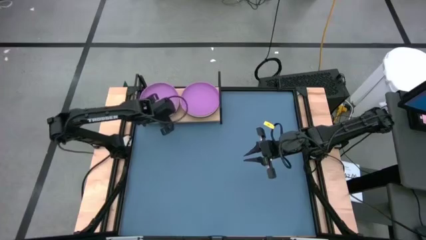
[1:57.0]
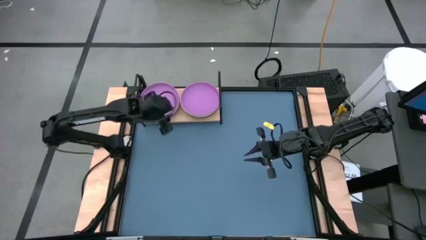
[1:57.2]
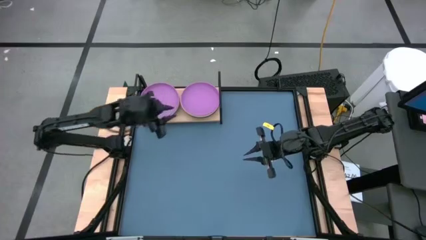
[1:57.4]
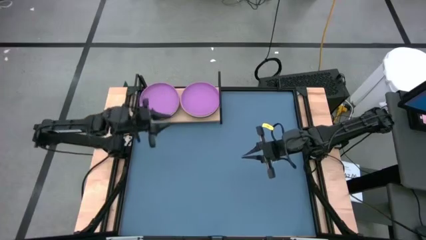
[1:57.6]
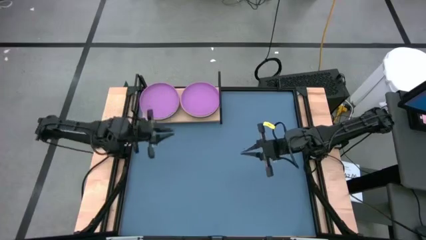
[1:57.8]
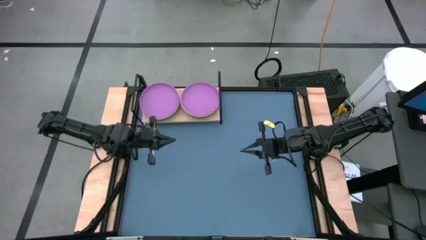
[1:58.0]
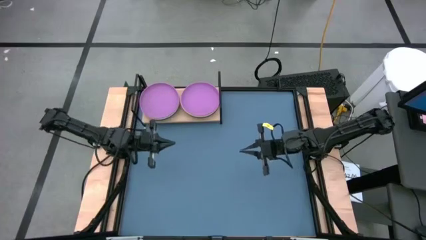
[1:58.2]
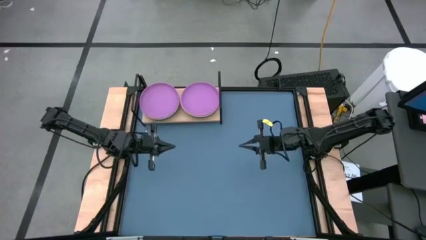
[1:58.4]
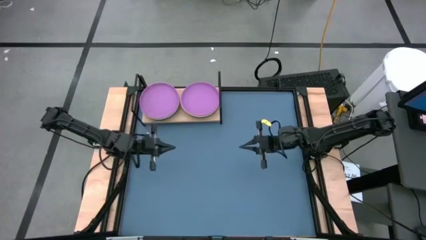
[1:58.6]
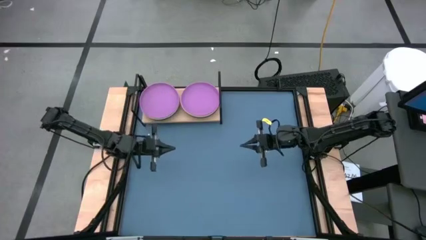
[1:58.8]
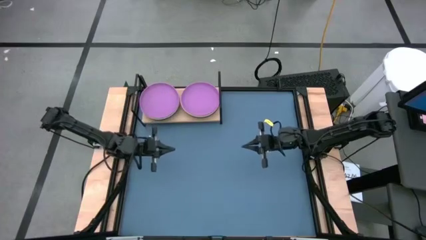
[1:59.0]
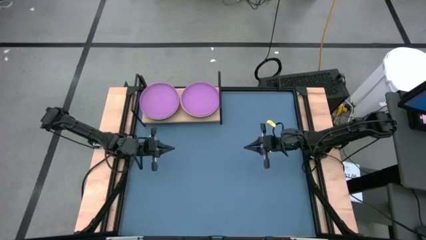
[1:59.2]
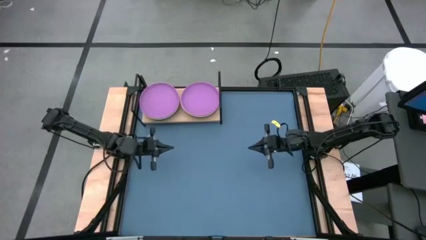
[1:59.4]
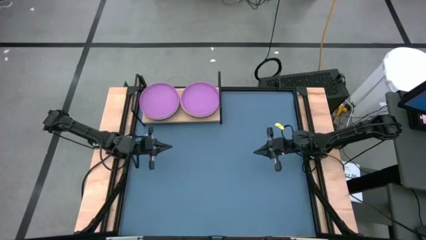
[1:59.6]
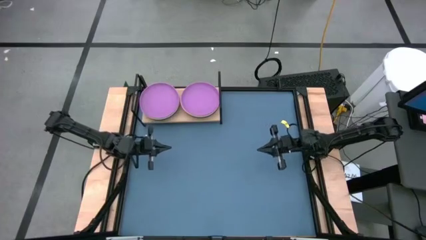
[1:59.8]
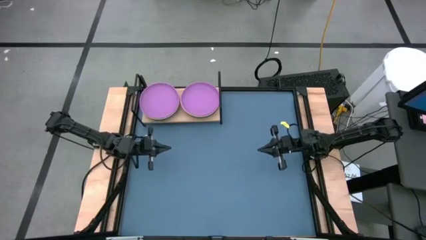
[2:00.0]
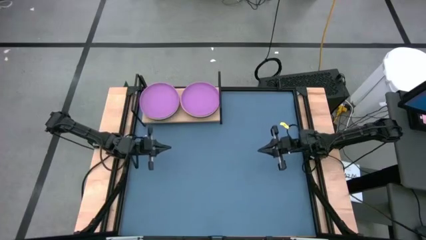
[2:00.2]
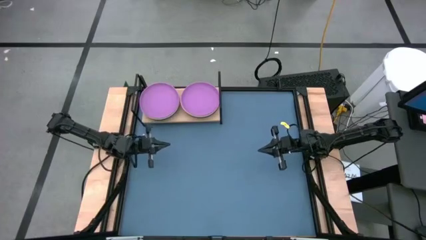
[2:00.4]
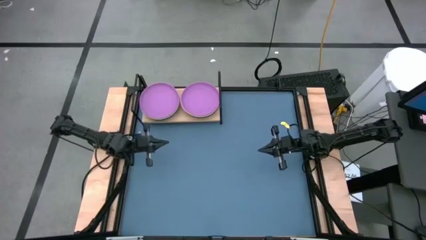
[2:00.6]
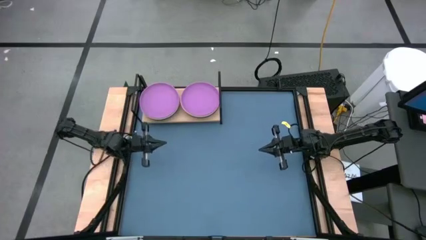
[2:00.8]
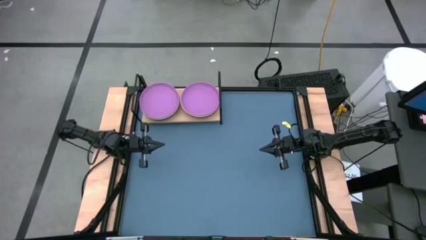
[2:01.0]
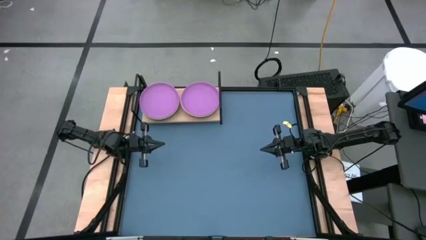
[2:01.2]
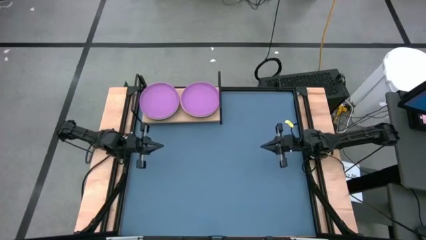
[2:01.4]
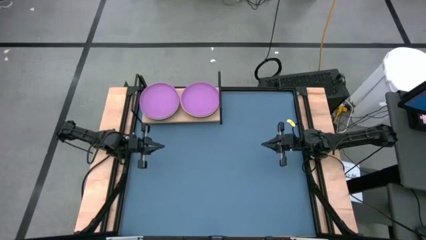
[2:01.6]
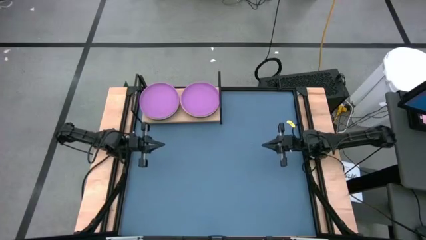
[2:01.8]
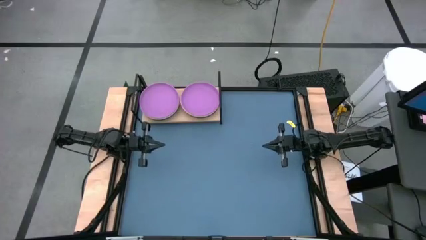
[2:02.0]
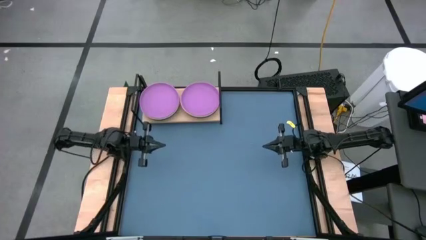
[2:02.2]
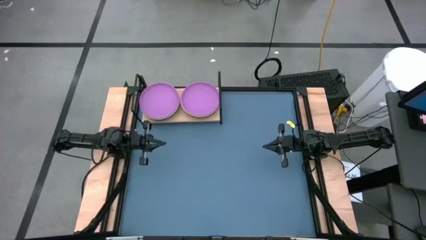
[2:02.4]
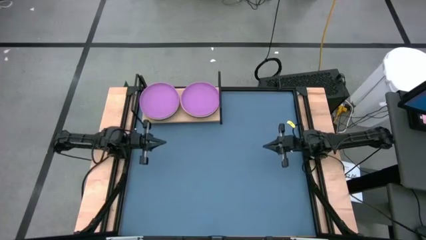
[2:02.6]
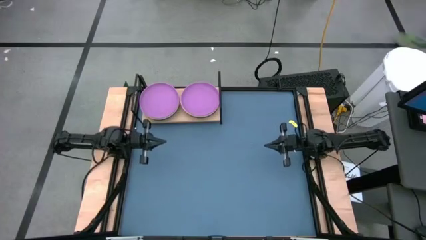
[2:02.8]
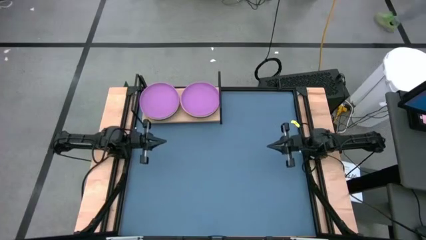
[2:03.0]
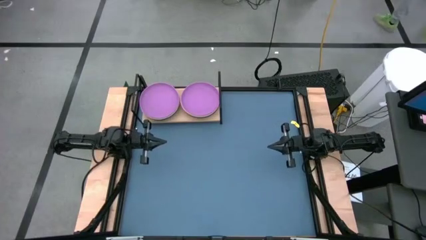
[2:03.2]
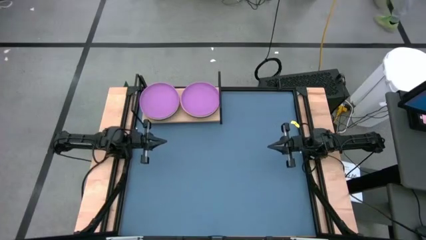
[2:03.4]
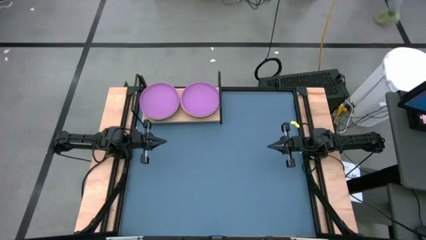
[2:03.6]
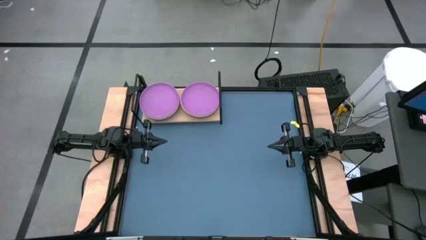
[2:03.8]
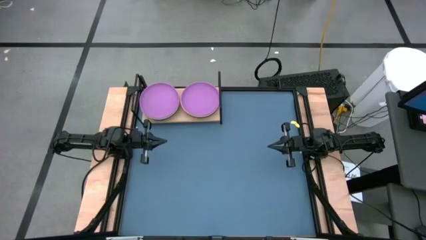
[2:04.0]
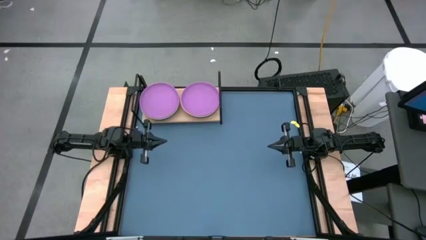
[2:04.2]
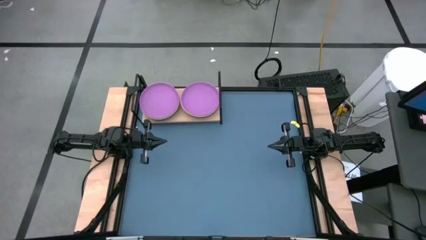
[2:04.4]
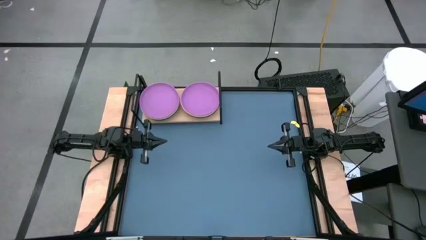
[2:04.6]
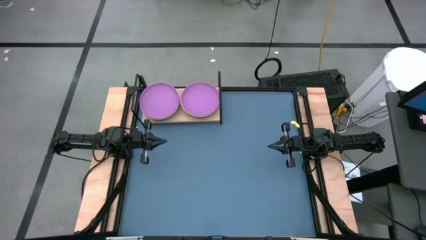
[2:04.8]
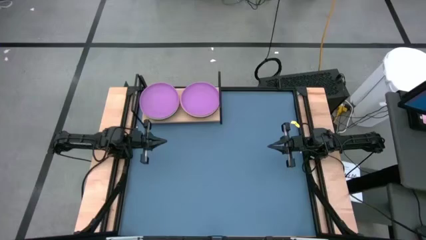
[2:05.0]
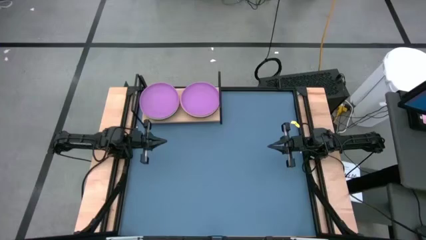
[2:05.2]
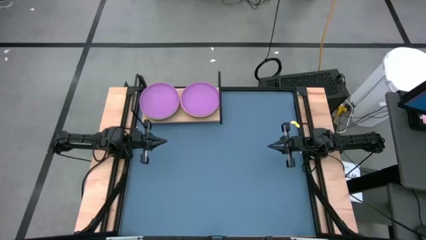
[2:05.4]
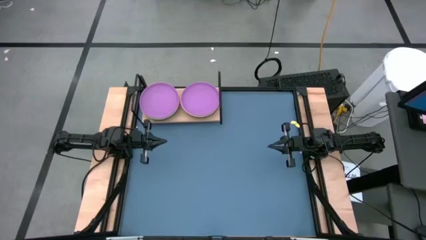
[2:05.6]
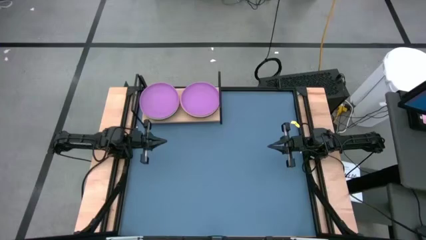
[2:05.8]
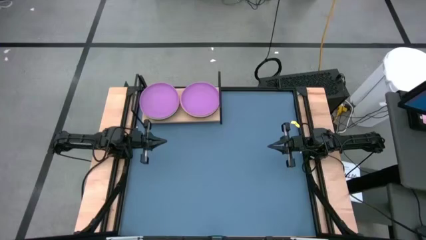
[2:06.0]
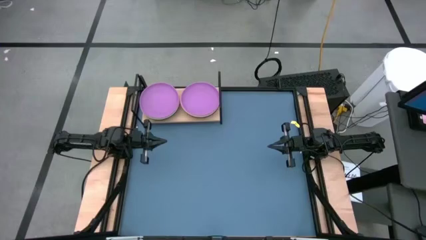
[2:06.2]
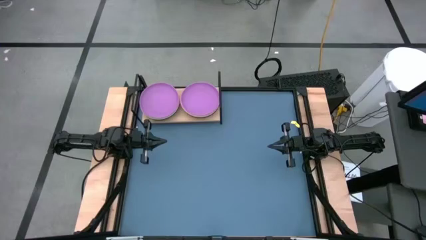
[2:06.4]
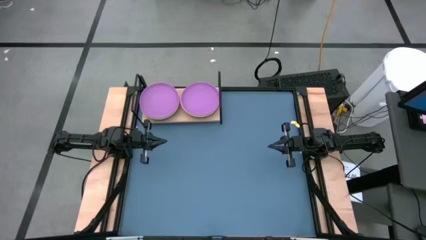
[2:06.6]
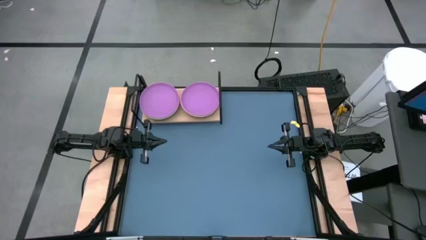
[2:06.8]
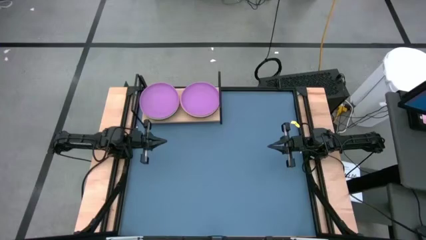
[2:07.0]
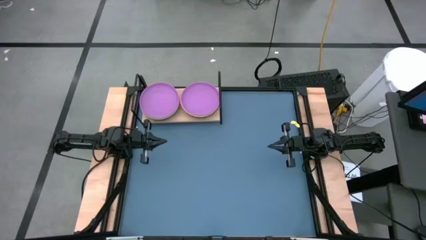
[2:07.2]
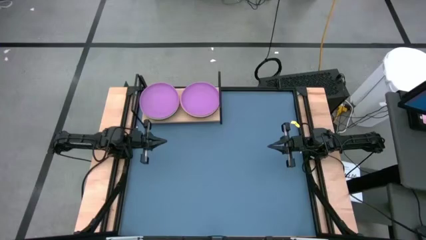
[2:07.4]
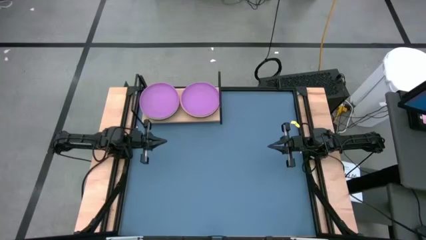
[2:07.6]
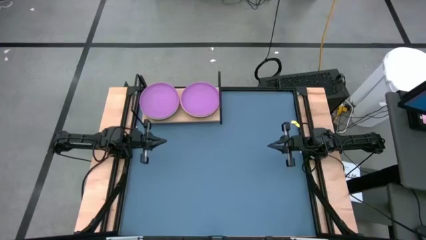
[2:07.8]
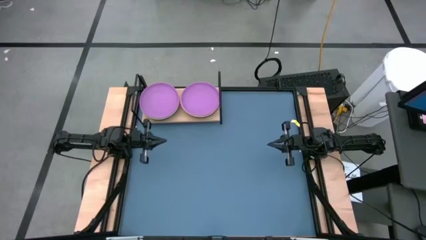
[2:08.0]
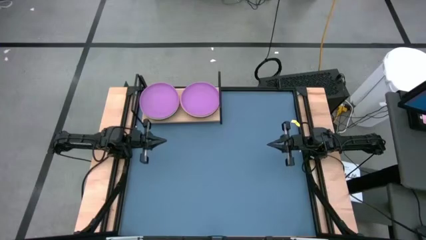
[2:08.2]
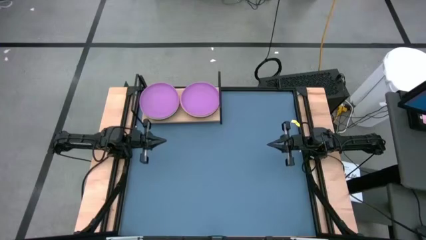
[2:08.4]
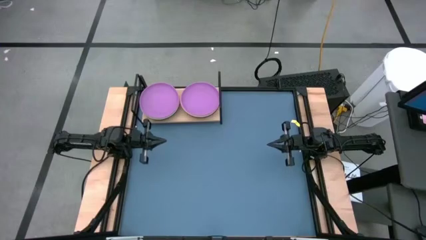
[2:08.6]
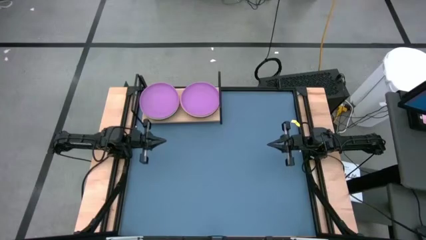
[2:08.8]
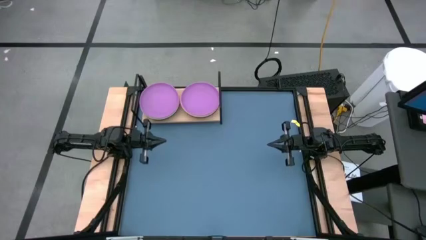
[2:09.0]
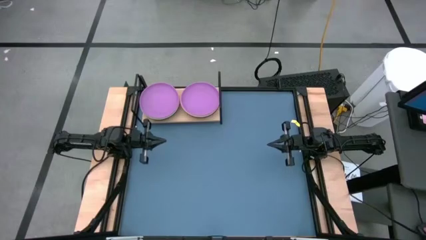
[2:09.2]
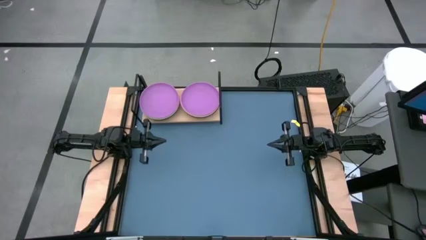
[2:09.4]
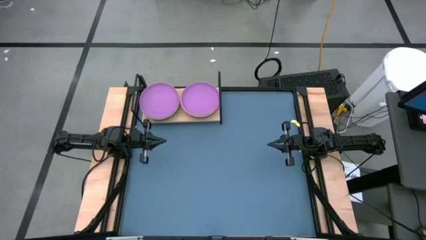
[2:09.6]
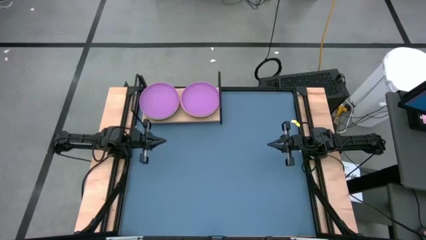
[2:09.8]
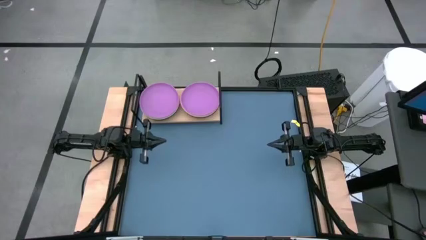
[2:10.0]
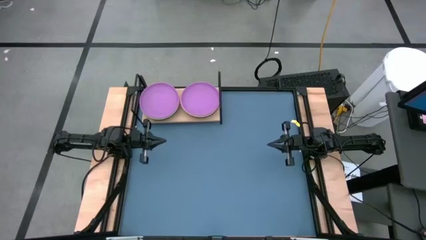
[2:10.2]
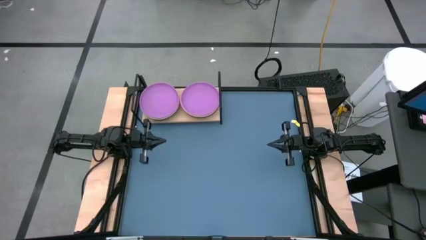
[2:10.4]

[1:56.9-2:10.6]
Task: Place and stack plates onto a shelf
Return to Home Position
